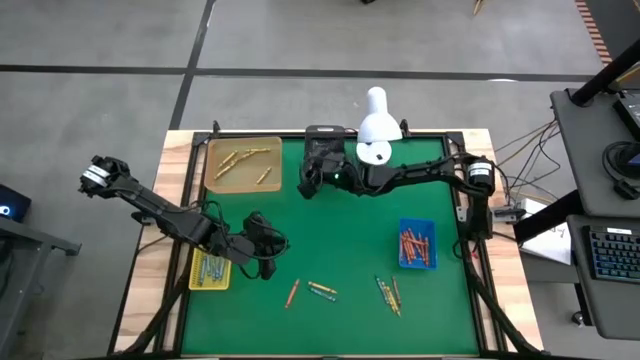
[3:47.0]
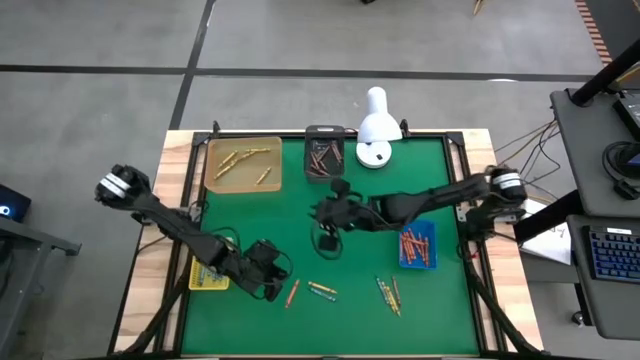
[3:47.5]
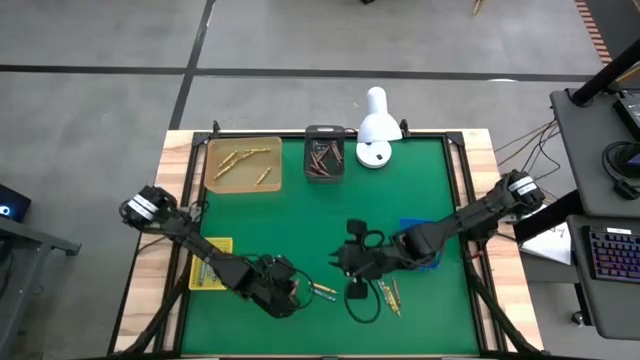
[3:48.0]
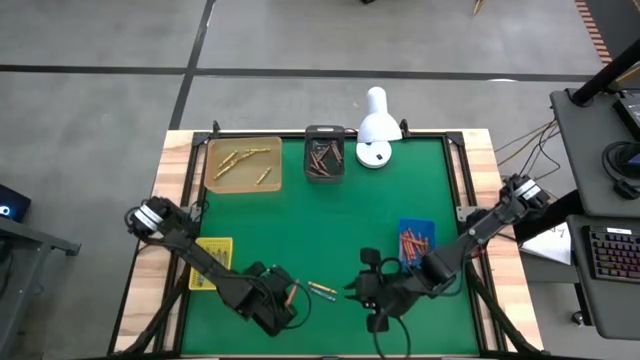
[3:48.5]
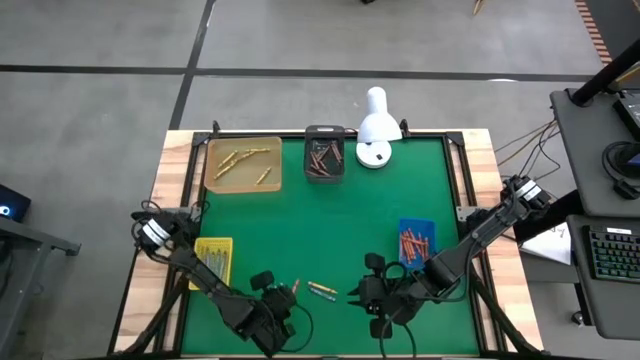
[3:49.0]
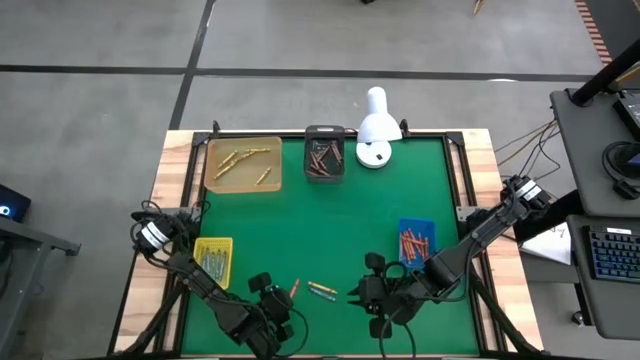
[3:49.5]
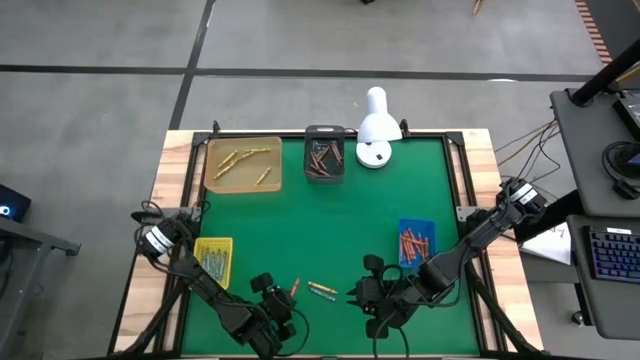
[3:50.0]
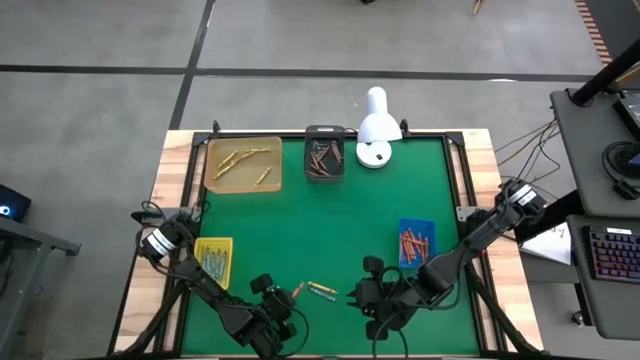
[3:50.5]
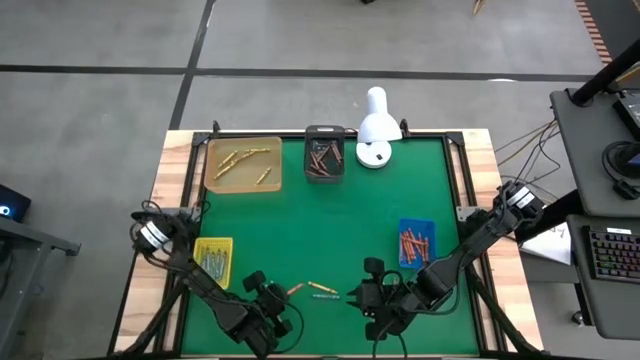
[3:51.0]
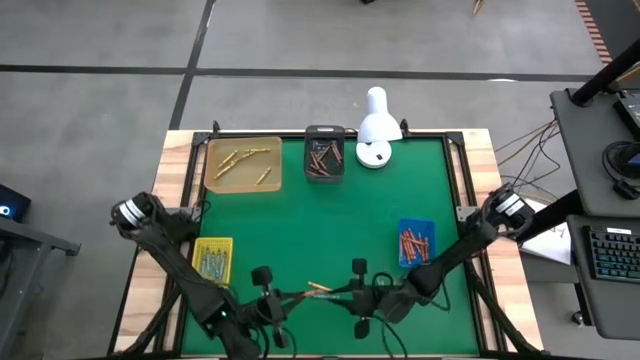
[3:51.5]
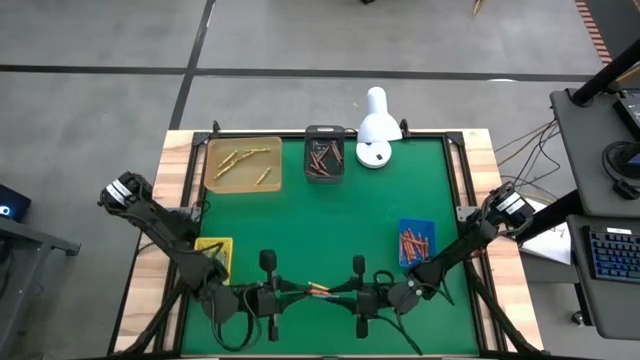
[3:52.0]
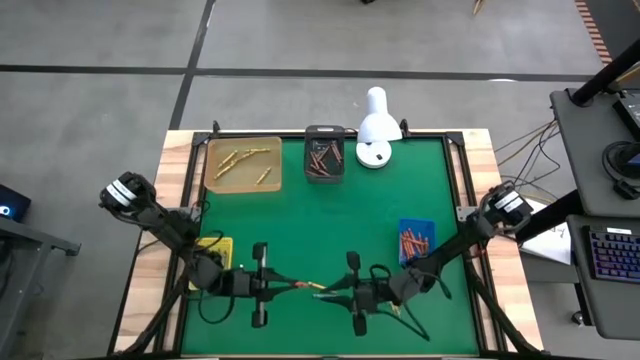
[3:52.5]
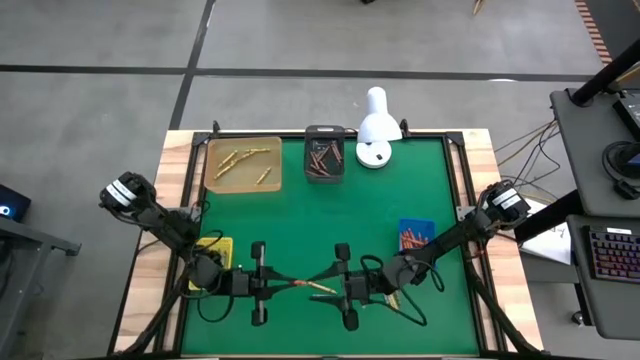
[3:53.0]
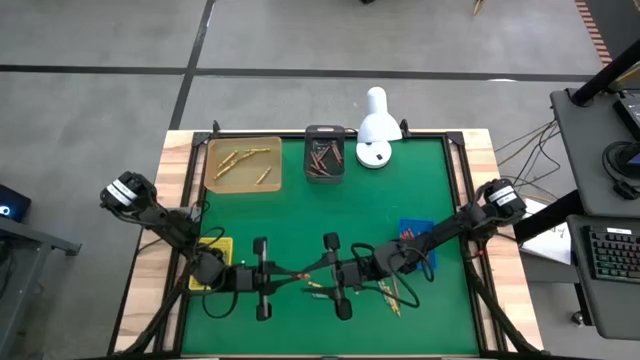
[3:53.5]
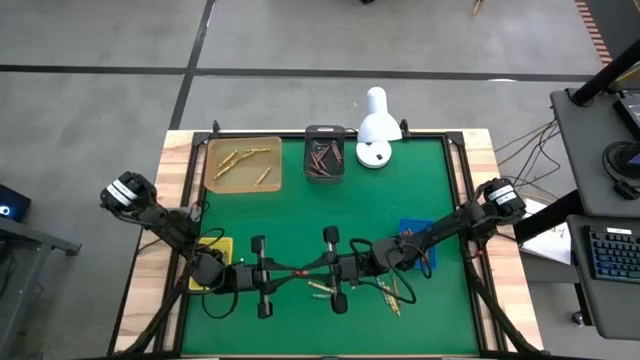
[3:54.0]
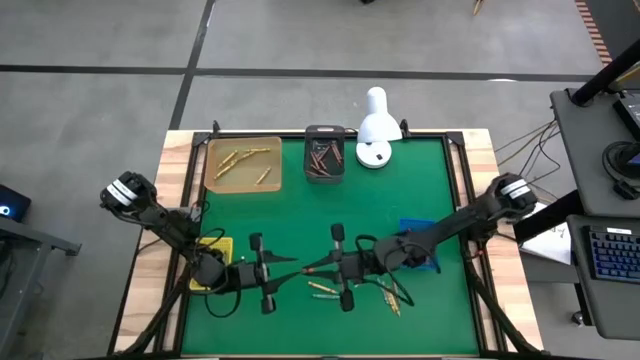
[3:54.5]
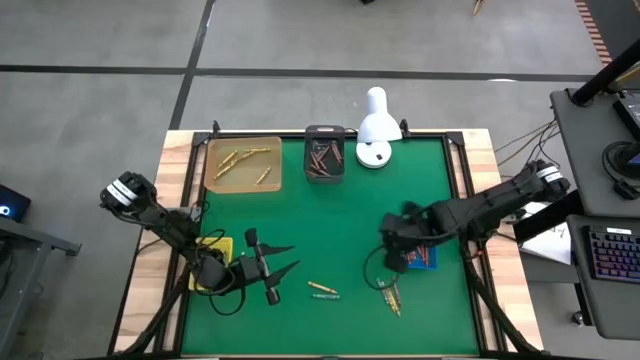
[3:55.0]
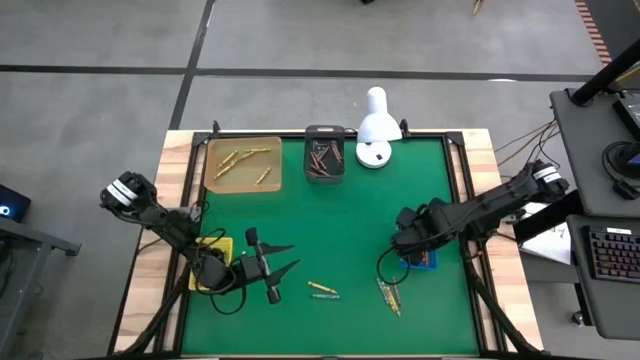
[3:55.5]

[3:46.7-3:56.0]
Task: Sort crayons
Put the orange crayon into the blue bin

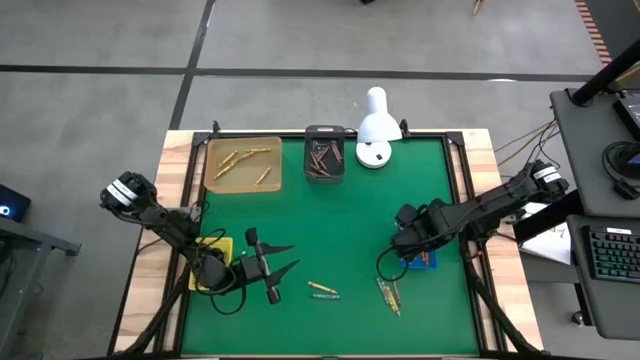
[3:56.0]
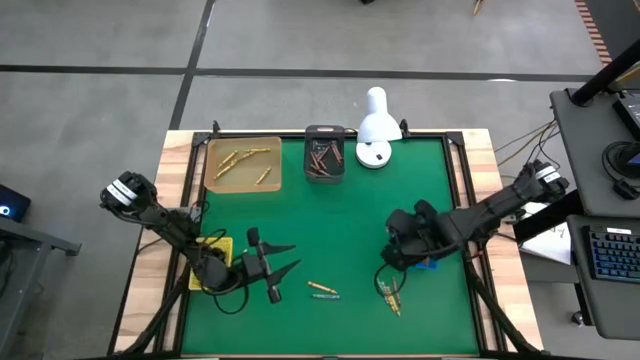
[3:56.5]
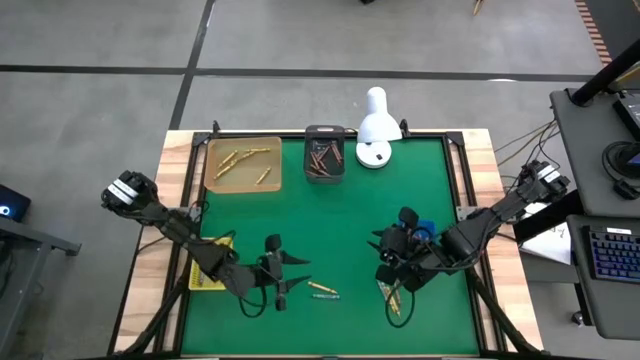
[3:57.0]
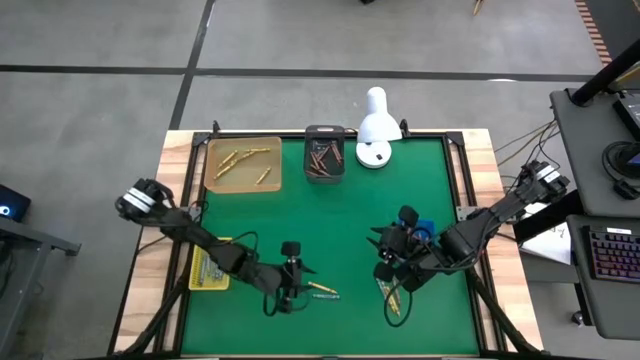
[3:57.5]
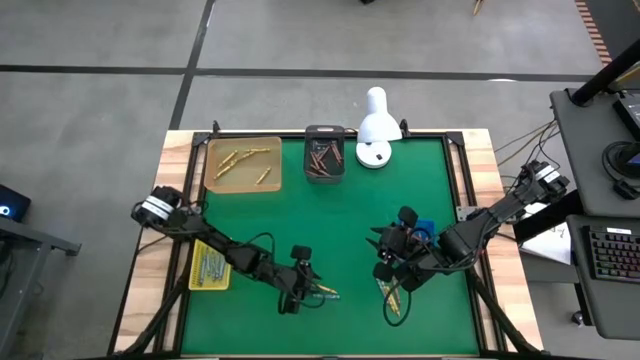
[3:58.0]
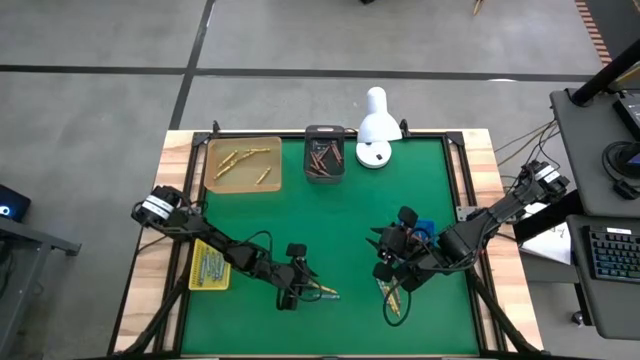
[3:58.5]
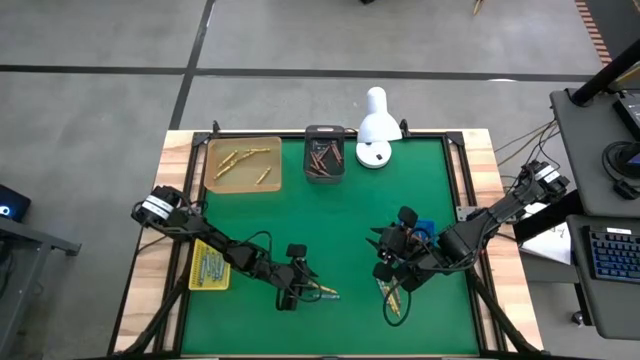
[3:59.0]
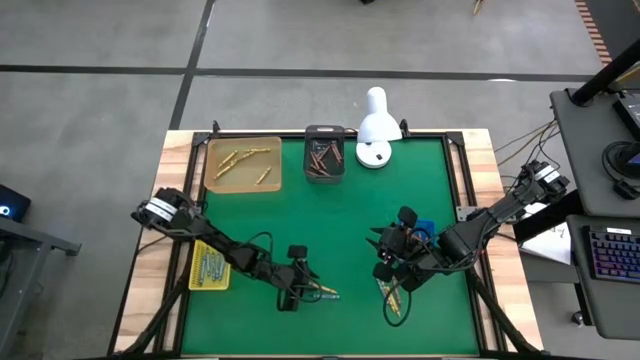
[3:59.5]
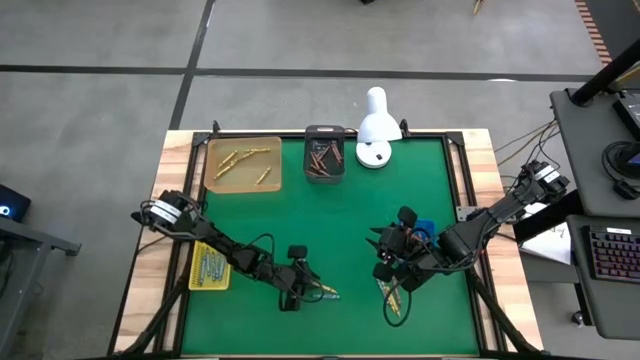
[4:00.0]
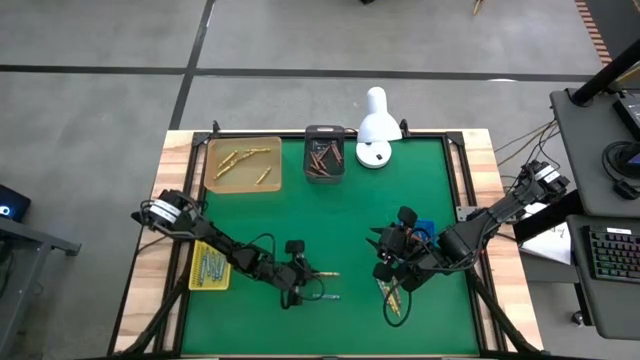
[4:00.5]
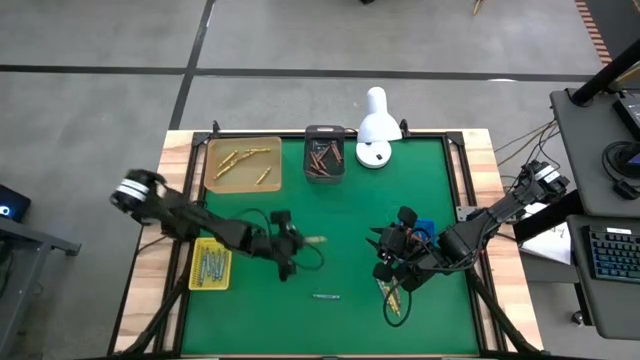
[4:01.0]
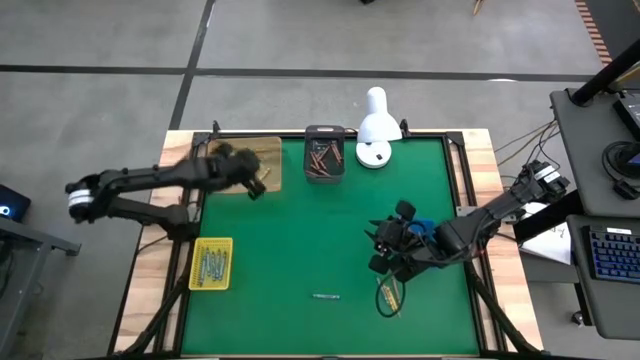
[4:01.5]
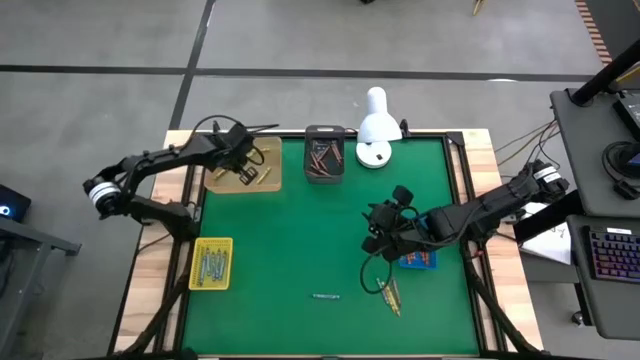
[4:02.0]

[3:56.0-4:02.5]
Put the green crayon into the orange bin

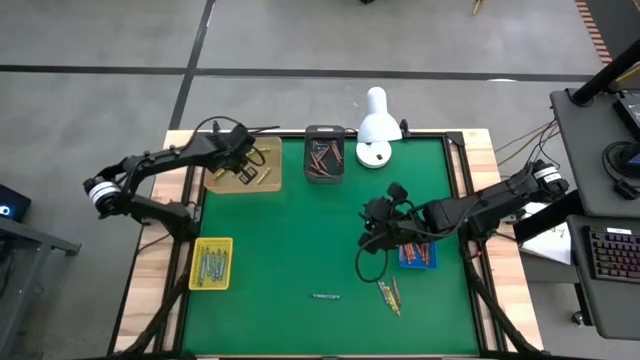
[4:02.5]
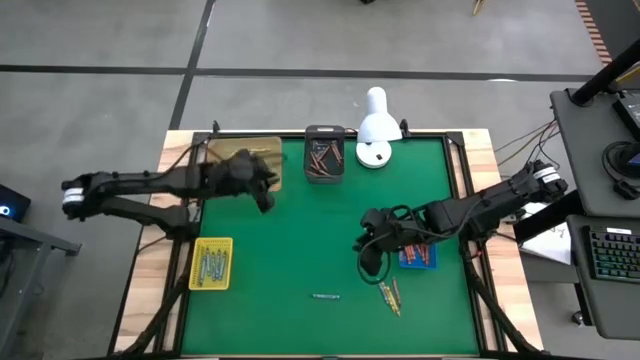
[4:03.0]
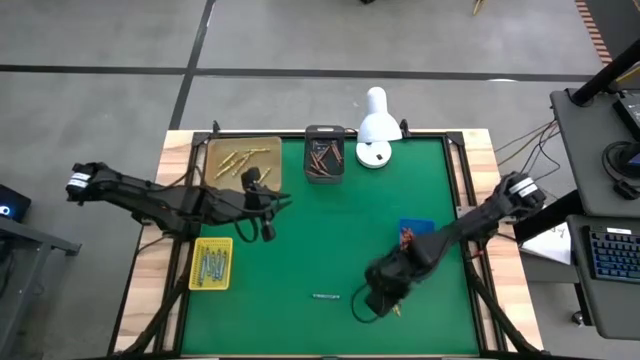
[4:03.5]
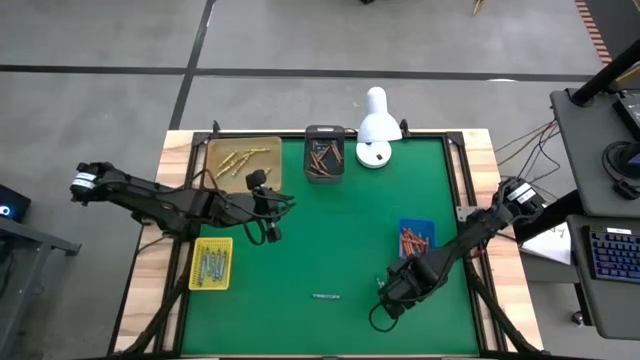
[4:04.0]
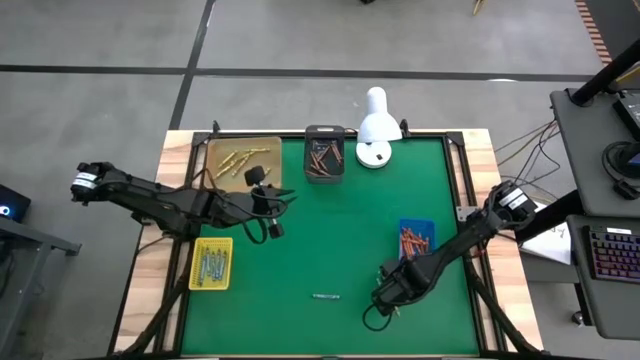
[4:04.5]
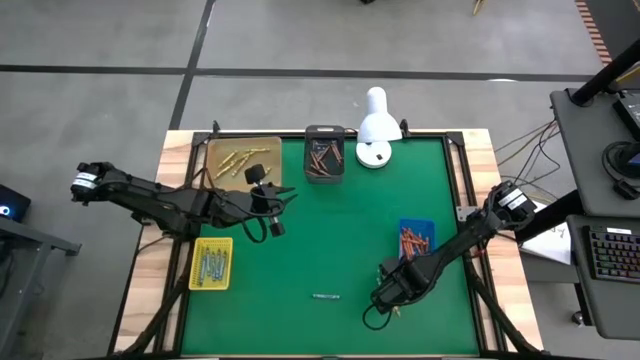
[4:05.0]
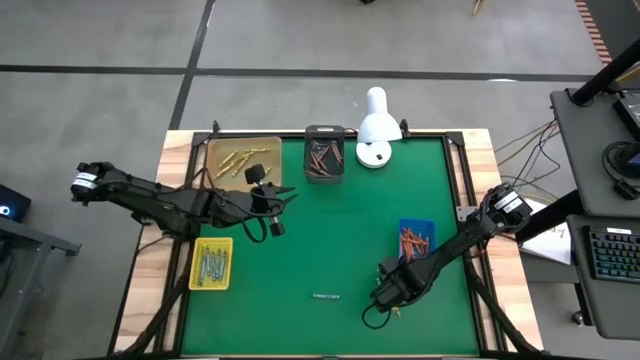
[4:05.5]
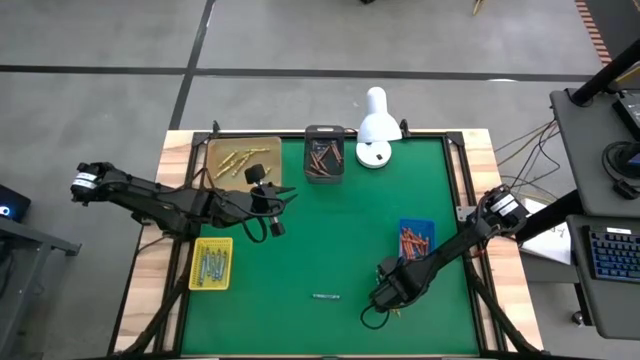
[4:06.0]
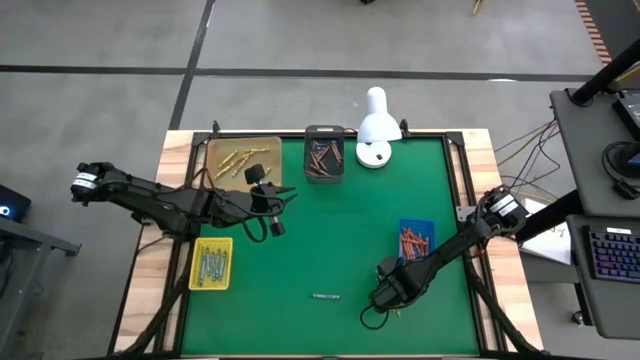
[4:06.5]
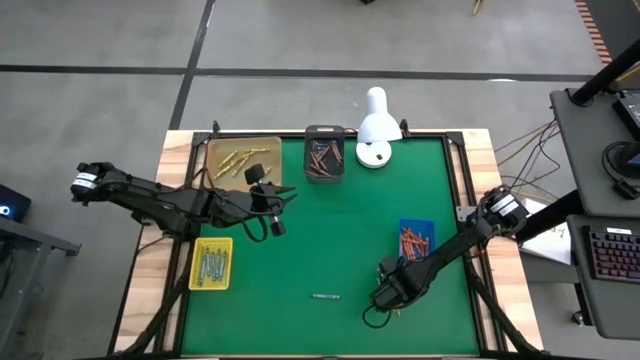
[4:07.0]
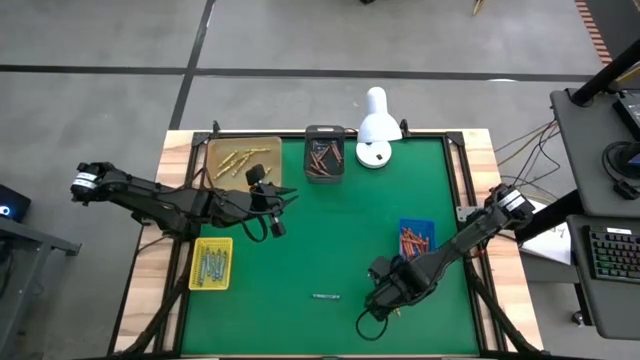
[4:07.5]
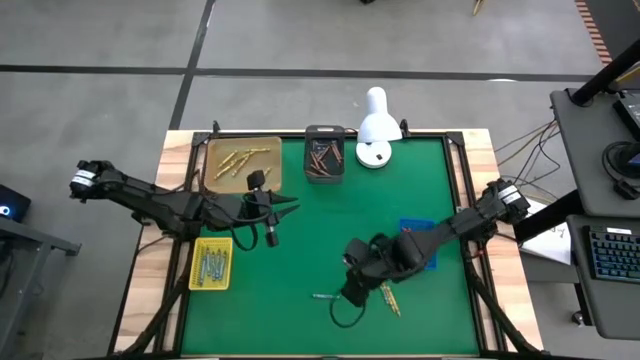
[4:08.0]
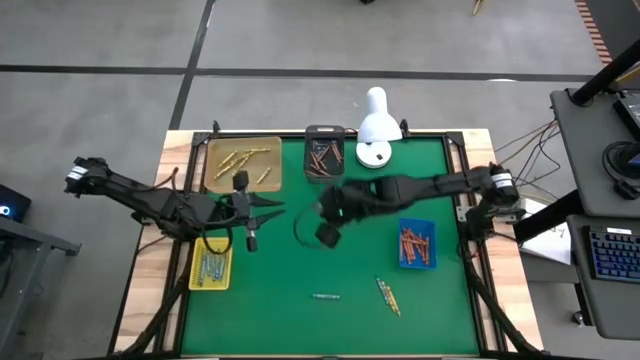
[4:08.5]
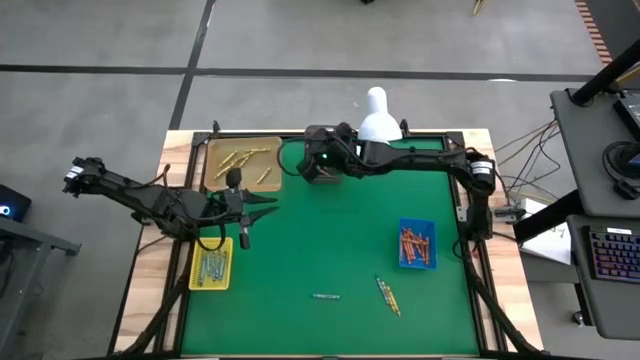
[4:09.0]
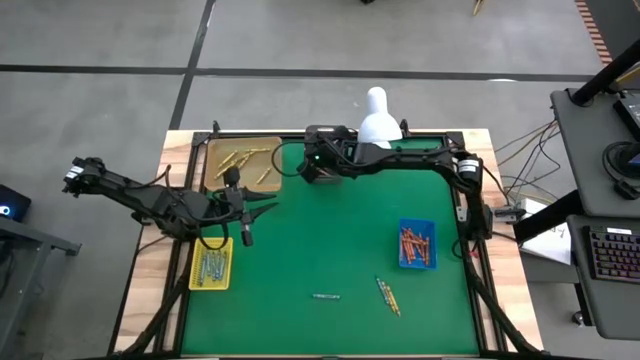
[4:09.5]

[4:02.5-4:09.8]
Put the brown crayon into the black bin
